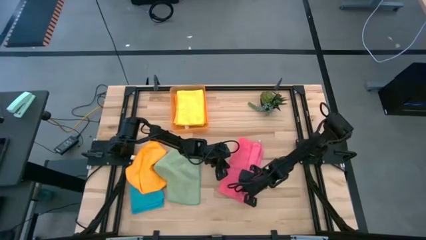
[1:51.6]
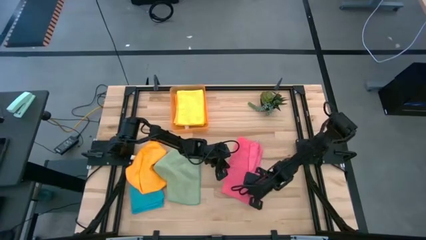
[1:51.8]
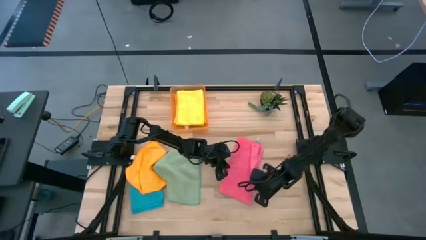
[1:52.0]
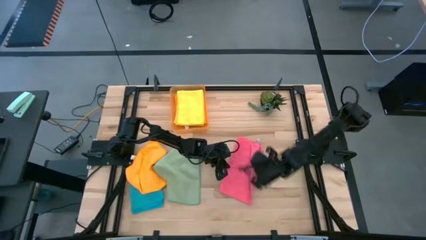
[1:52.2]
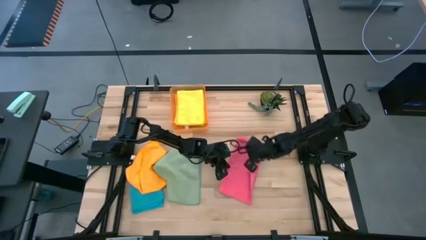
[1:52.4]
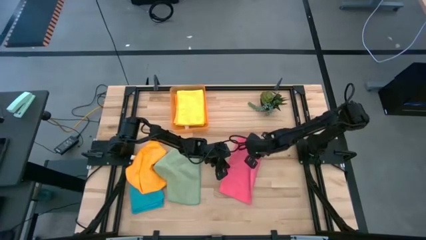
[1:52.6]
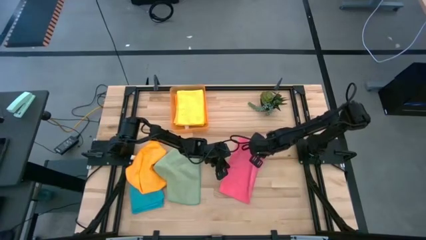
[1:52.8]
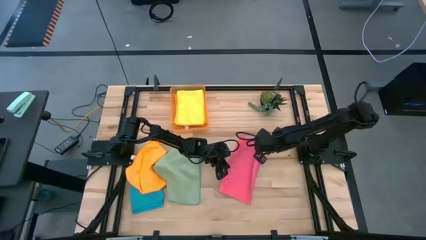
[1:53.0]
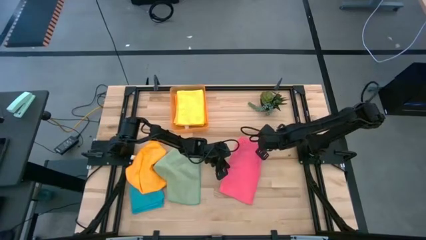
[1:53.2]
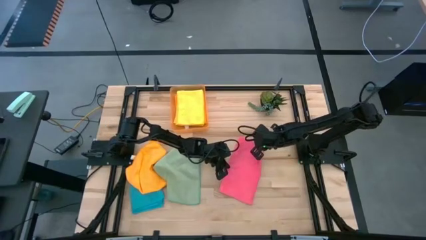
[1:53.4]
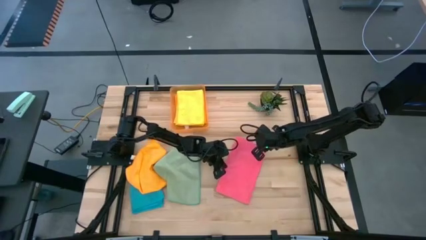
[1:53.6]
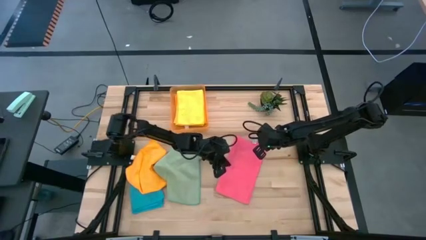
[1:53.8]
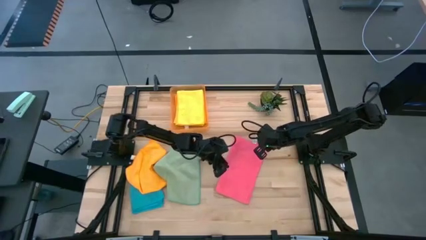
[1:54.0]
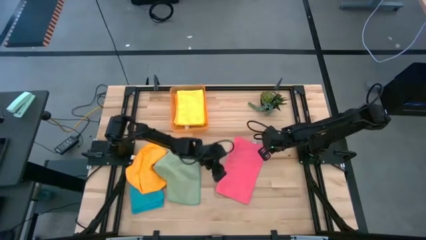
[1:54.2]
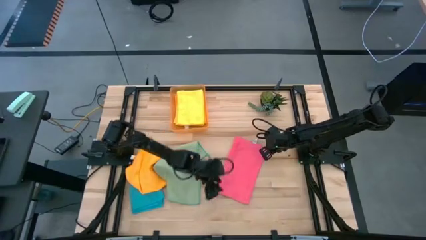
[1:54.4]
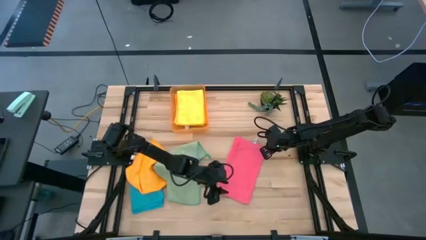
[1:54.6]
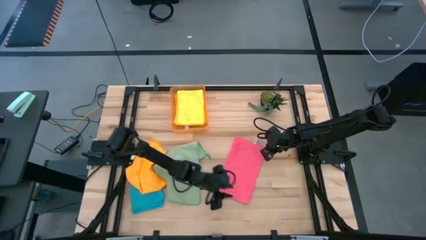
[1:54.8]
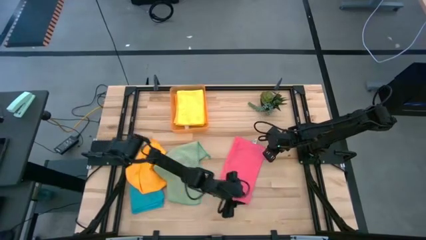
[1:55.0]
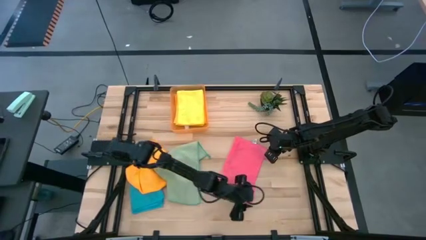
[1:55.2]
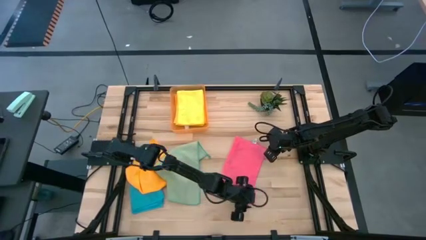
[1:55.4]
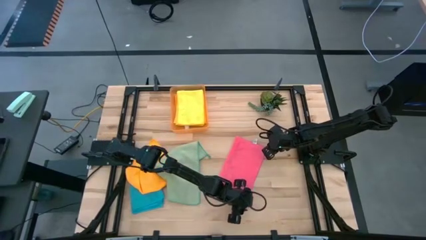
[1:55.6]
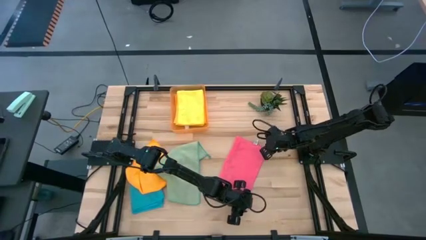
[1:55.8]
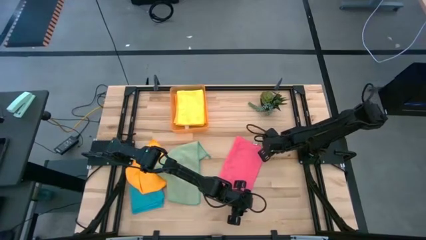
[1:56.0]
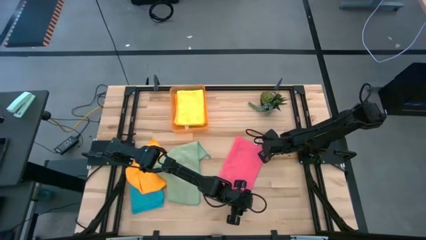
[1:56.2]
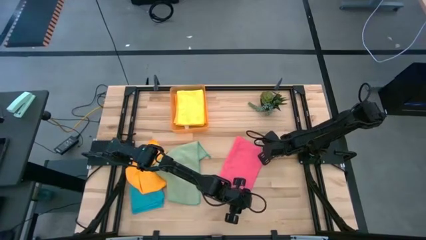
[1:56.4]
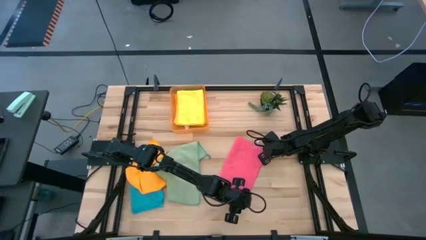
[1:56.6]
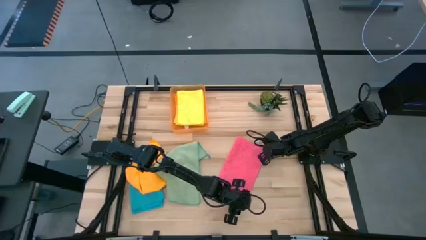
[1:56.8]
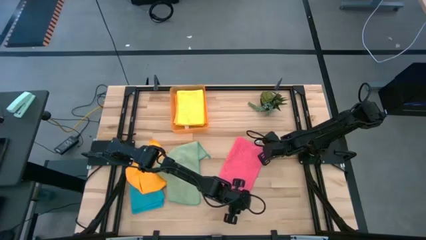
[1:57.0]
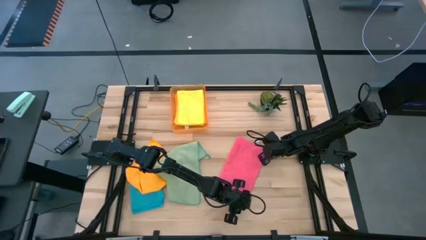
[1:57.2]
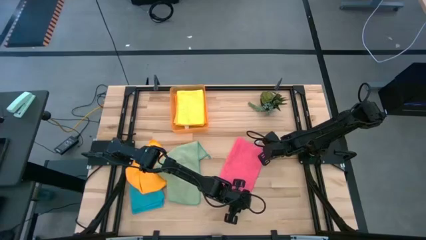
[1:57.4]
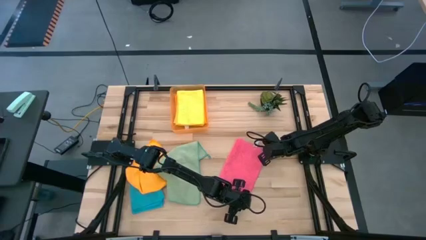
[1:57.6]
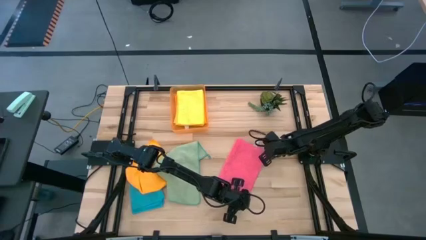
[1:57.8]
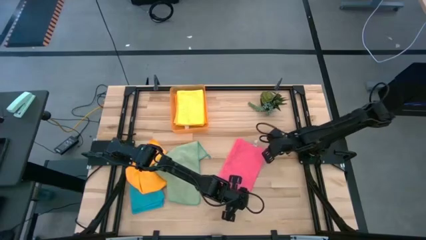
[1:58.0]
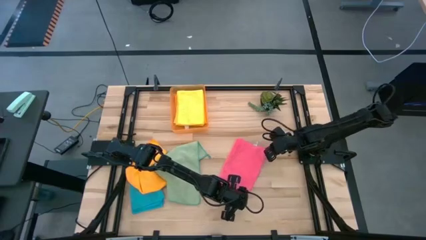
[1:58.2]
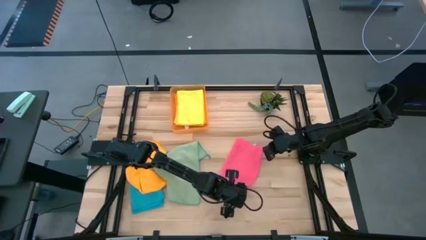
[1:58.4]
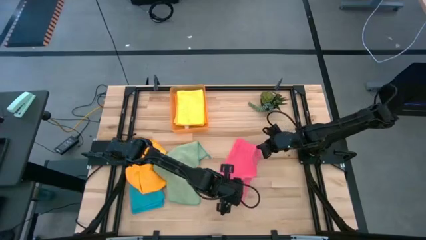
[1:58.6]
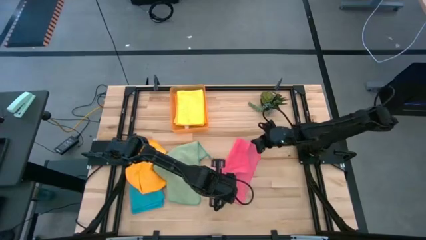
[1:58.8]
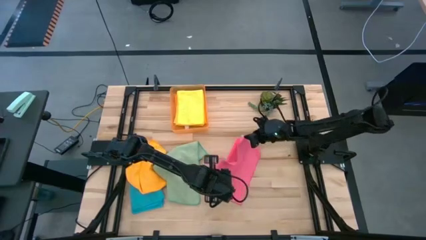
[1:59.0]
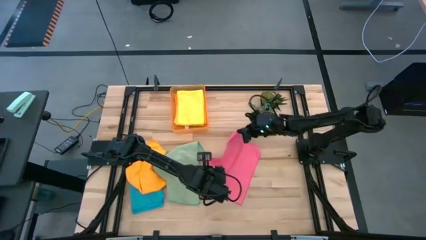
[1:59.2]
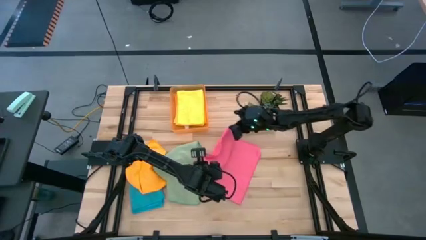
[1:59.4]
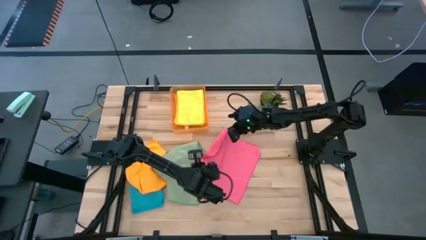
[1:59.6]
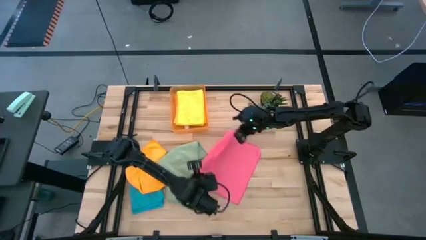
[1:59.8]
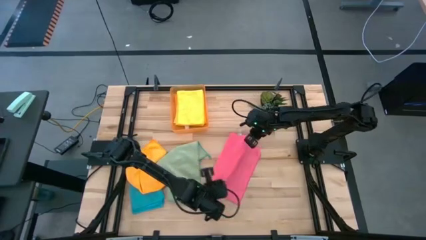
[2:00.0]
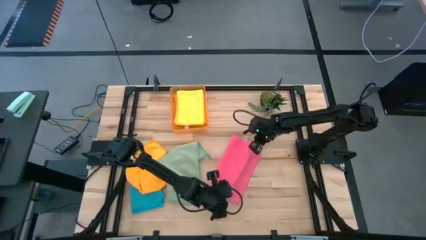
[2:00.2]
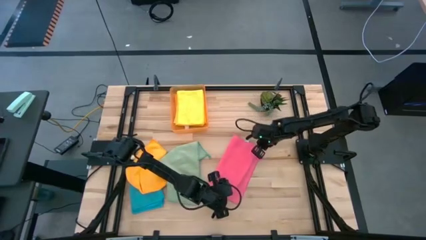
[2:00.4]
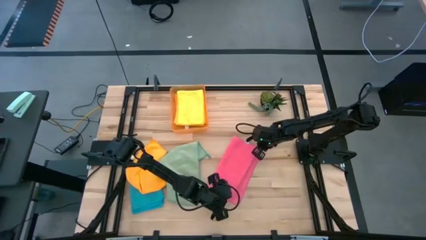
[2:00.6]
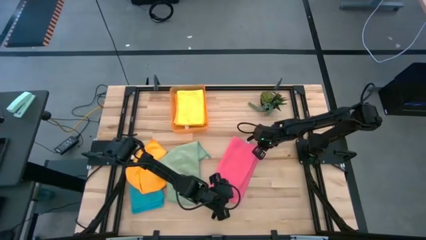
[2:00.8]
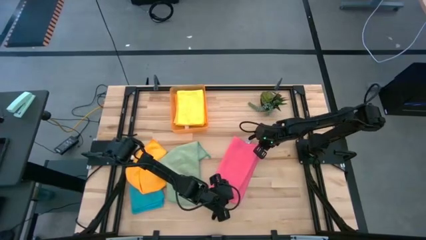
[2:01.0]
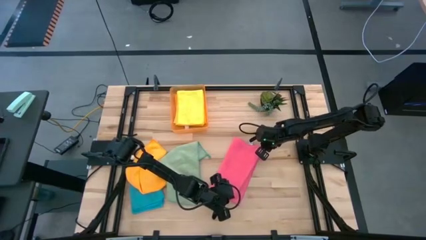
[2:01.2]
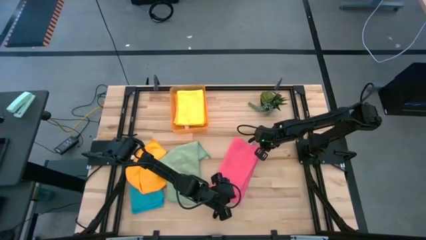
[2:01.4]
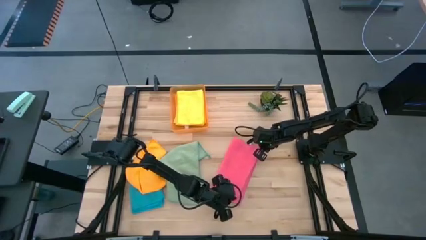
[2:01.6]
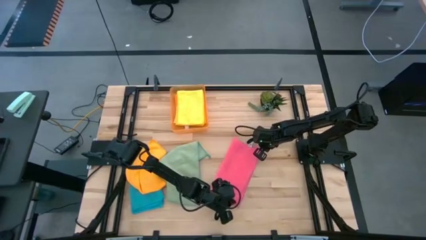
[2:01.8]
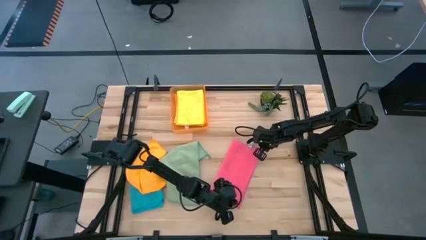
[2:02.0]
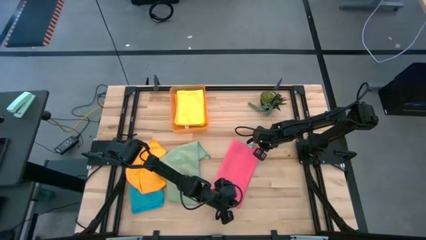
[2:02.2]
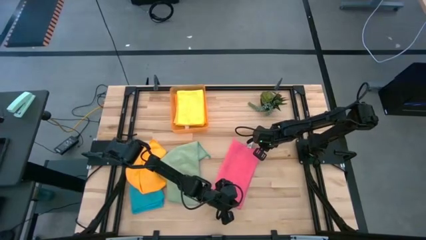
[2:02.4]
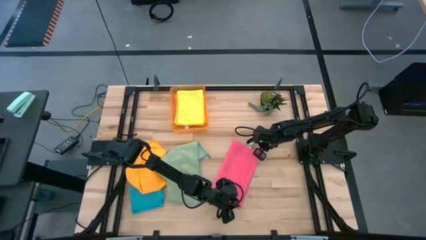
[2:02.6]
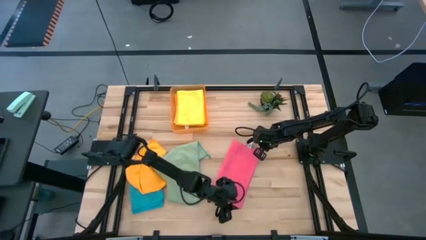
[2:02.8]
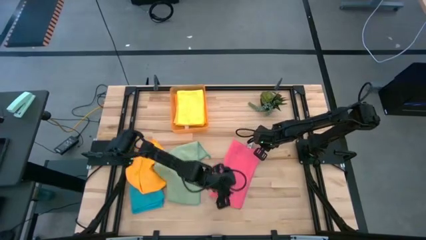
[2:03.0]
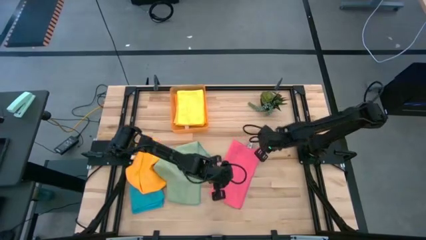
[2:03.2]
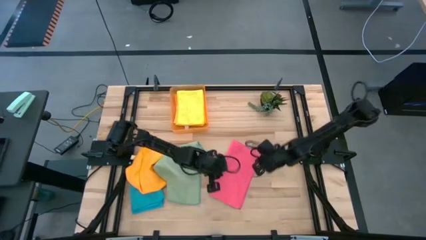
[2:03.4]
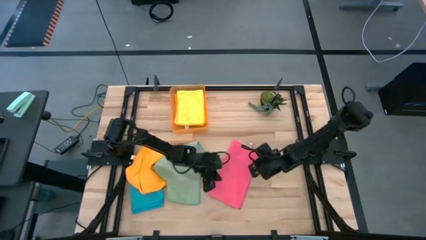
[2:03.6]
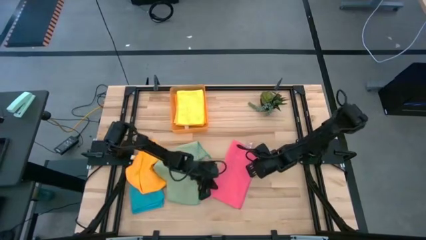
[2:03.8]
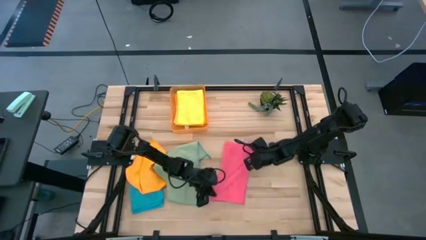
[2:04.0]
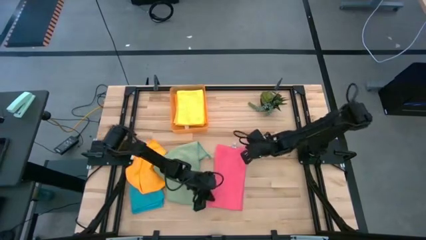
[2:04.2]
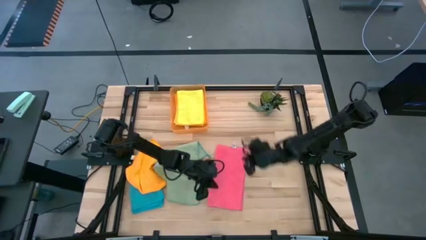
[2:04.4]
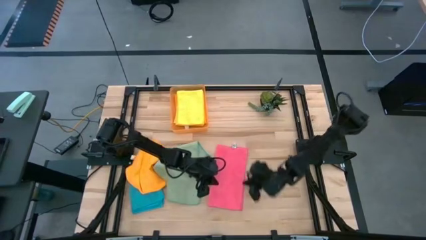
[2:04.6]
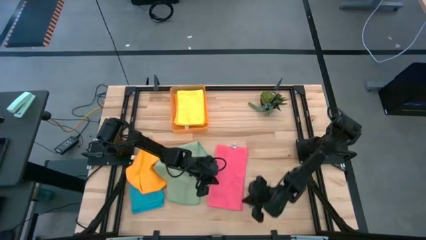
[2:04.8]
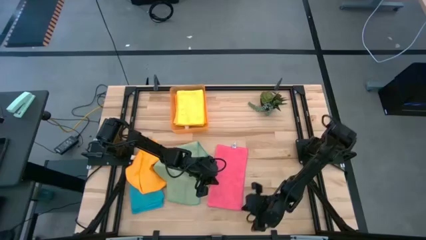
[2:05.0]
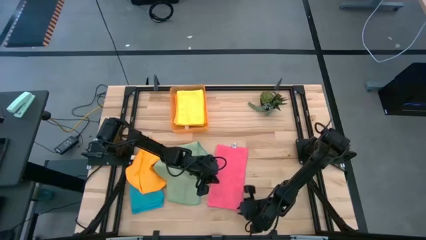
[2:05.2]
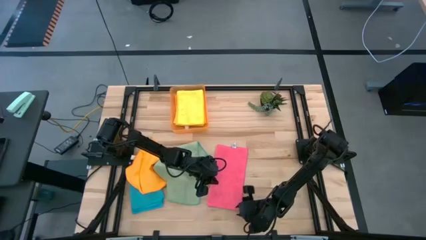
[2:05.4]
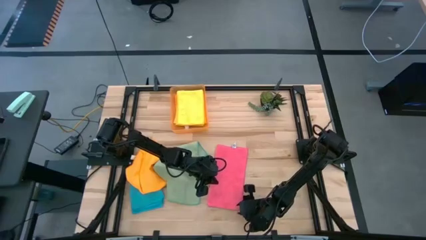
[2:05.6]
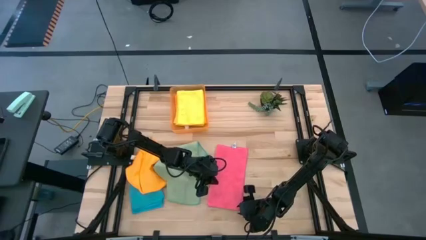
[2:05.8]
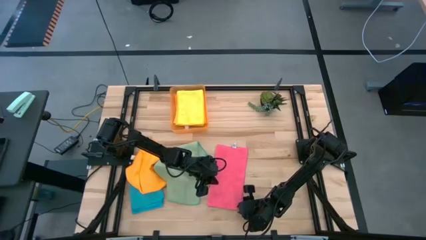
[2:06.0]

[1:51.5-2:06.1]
Task: Fold microfiber towels
Fold the pink microfiber cloth
